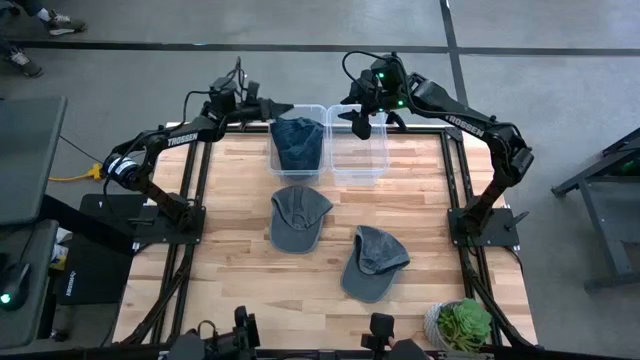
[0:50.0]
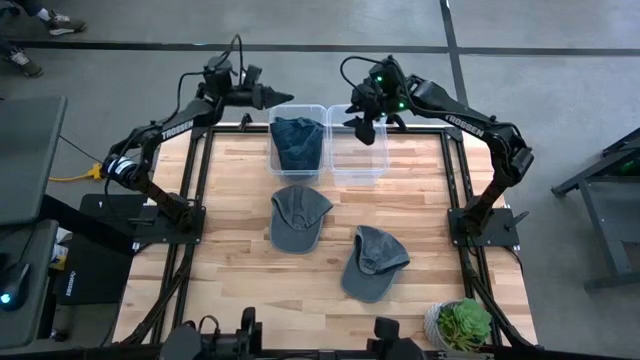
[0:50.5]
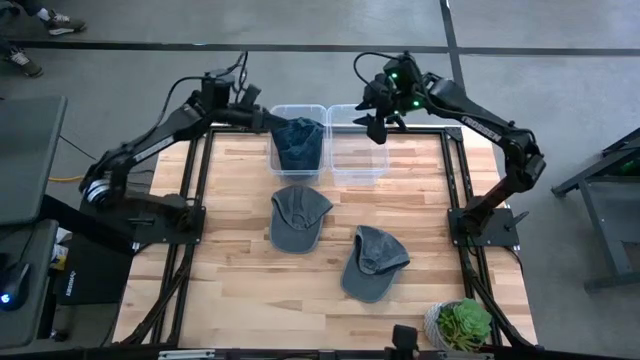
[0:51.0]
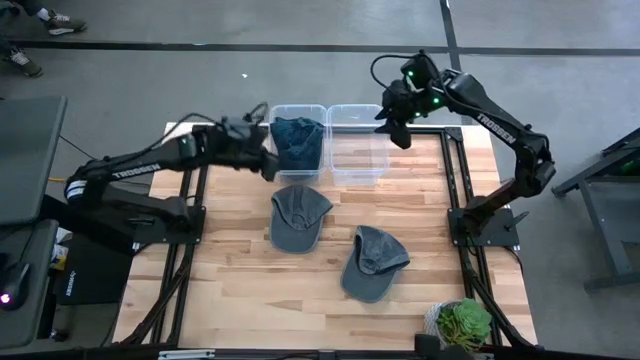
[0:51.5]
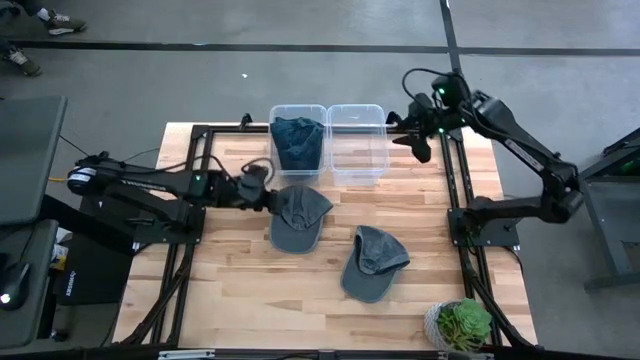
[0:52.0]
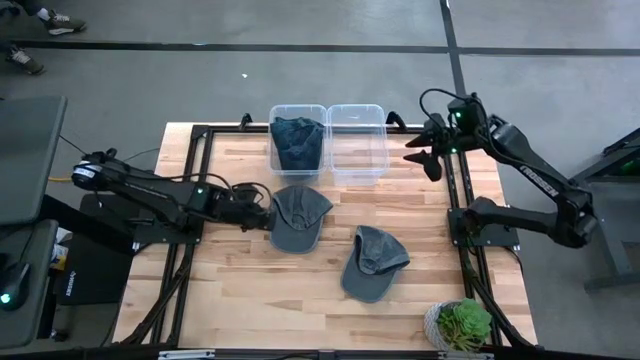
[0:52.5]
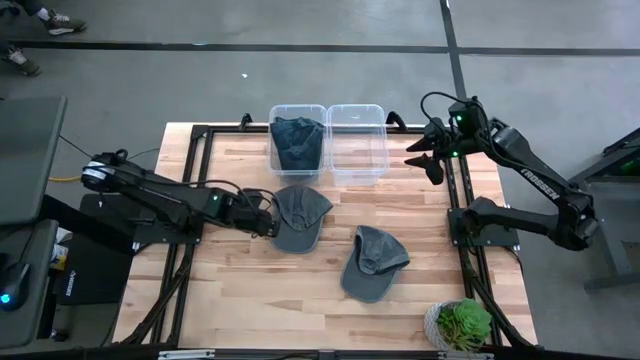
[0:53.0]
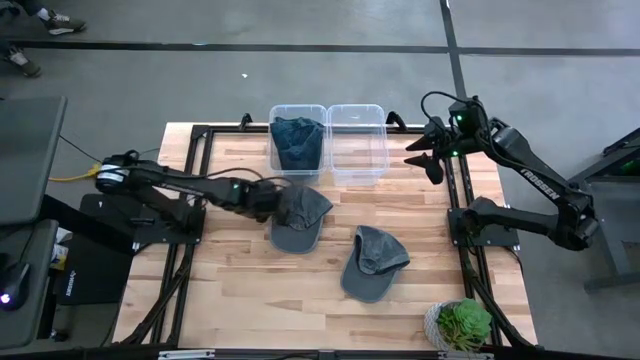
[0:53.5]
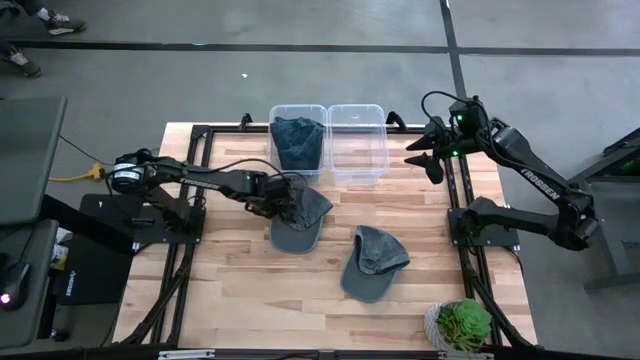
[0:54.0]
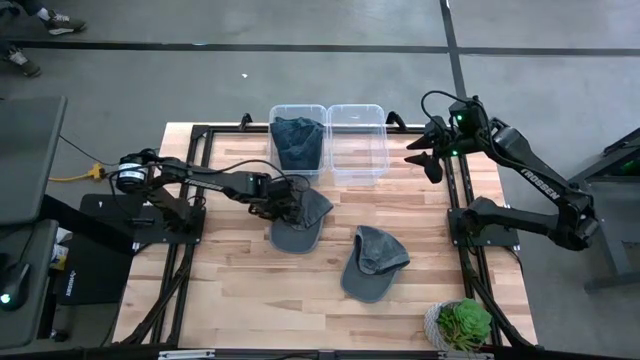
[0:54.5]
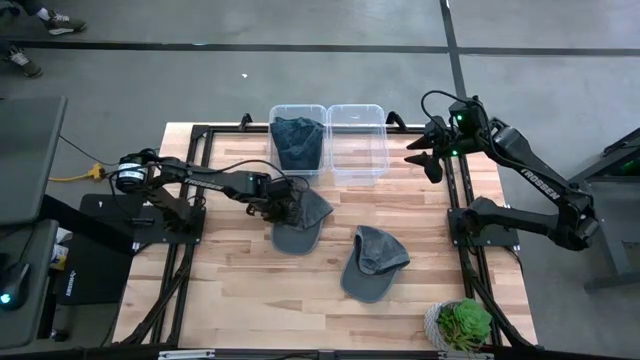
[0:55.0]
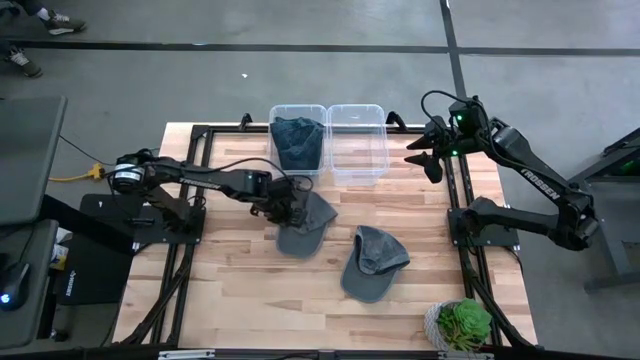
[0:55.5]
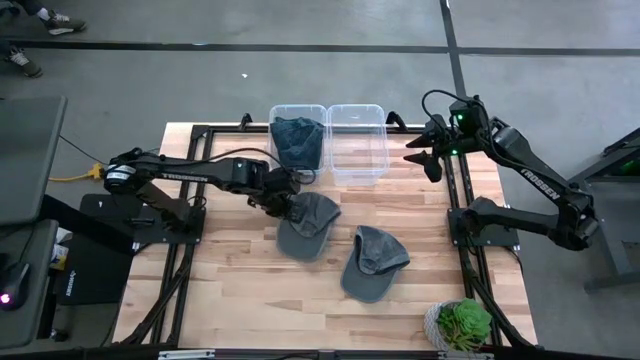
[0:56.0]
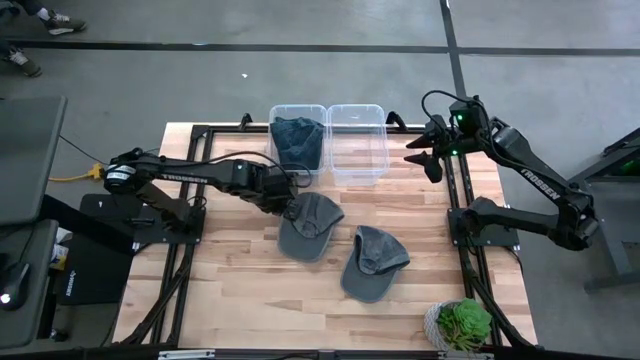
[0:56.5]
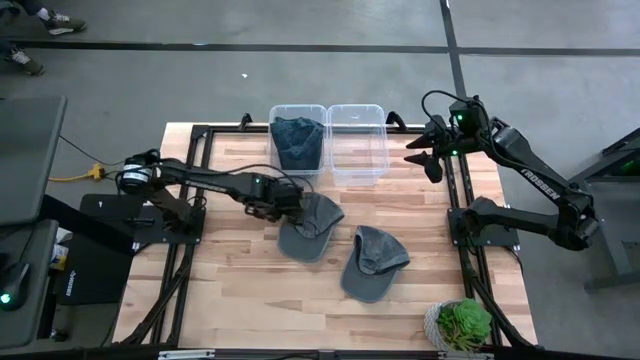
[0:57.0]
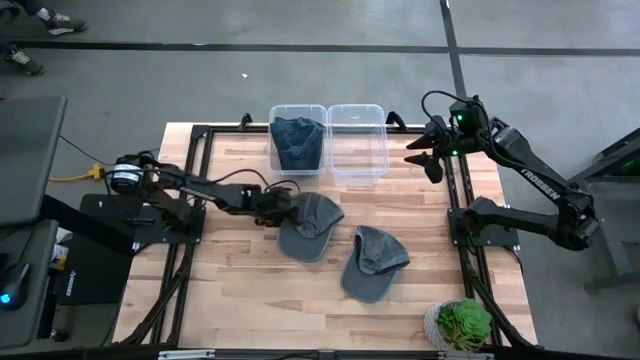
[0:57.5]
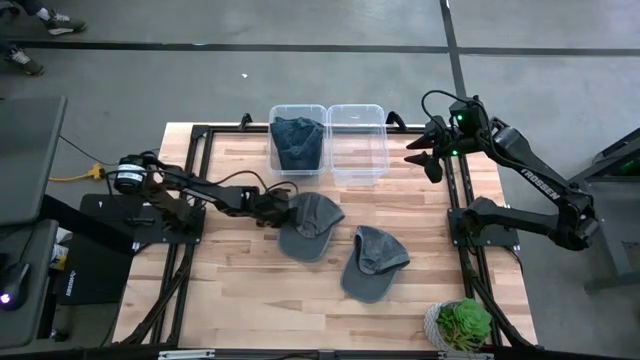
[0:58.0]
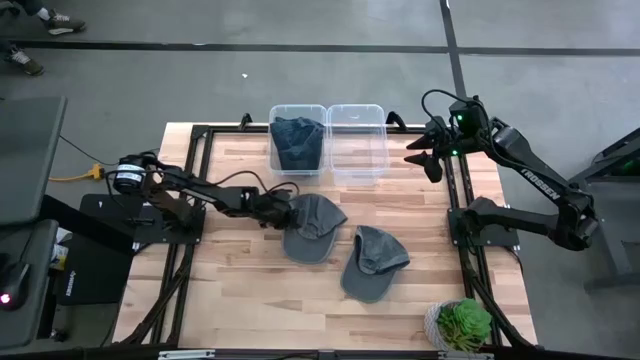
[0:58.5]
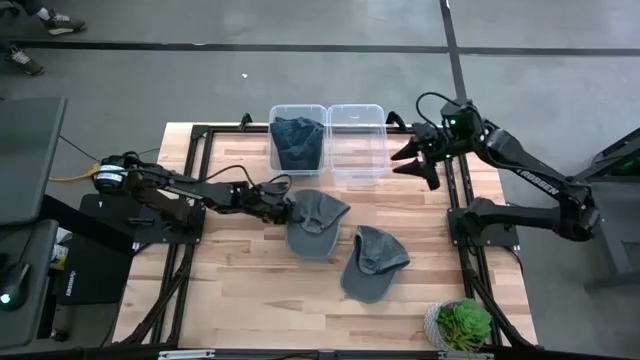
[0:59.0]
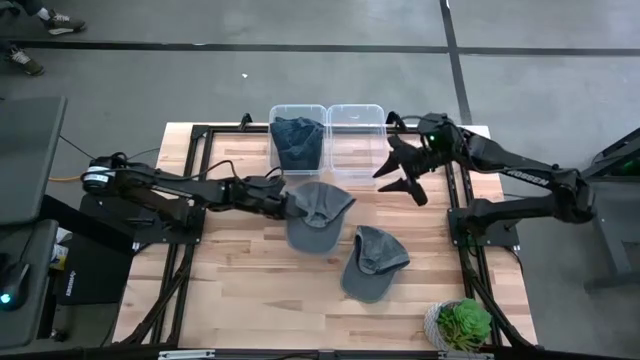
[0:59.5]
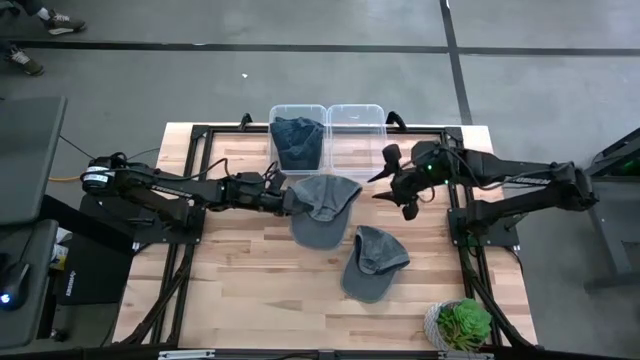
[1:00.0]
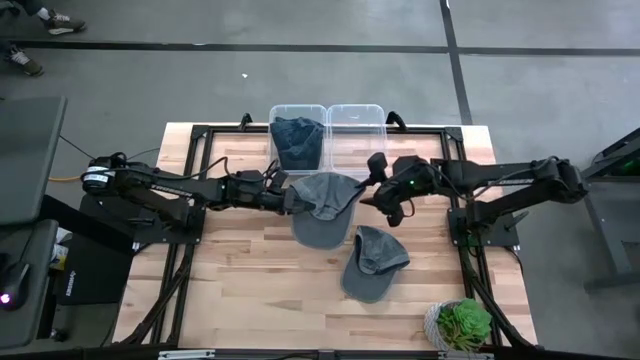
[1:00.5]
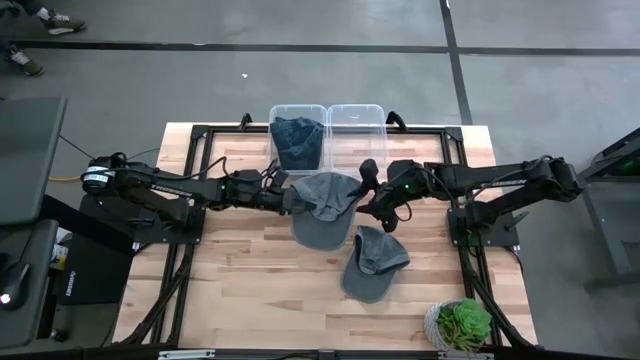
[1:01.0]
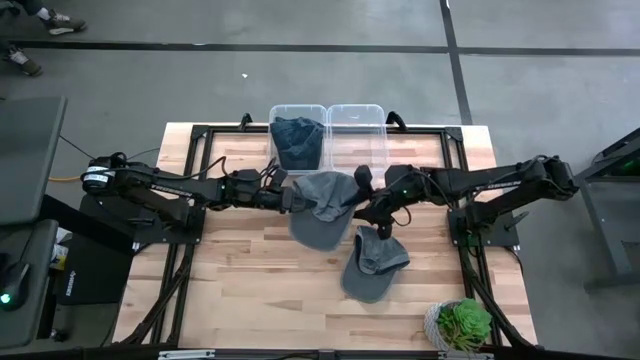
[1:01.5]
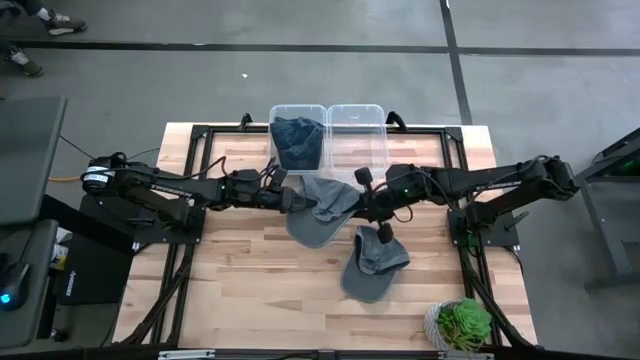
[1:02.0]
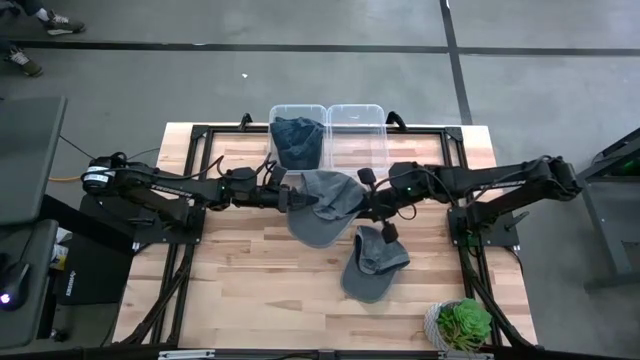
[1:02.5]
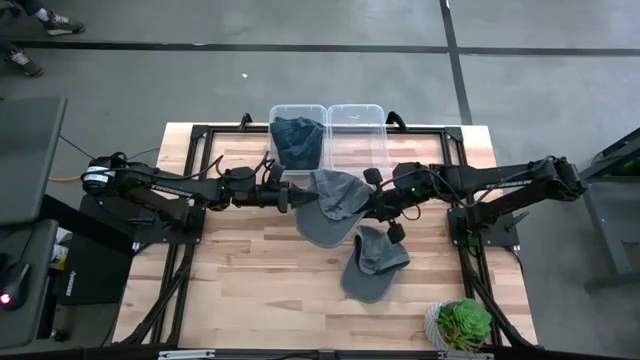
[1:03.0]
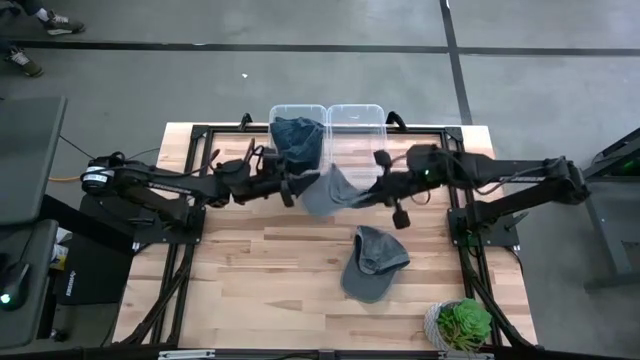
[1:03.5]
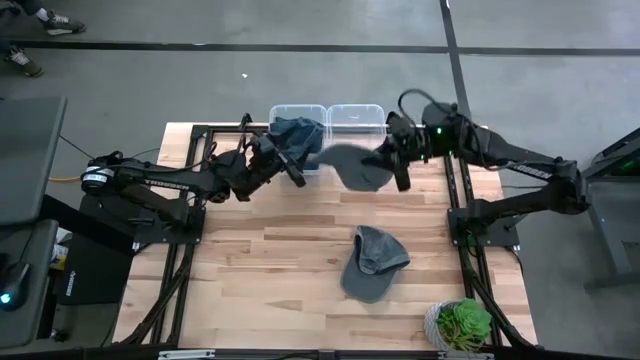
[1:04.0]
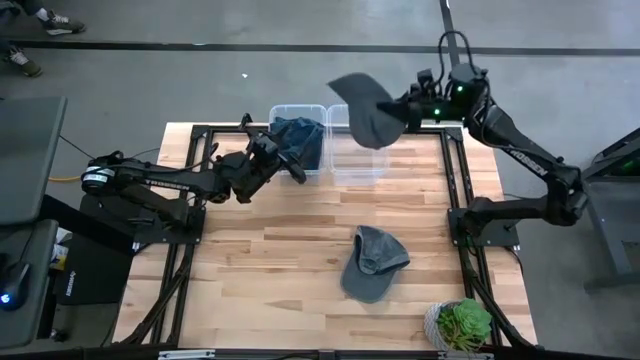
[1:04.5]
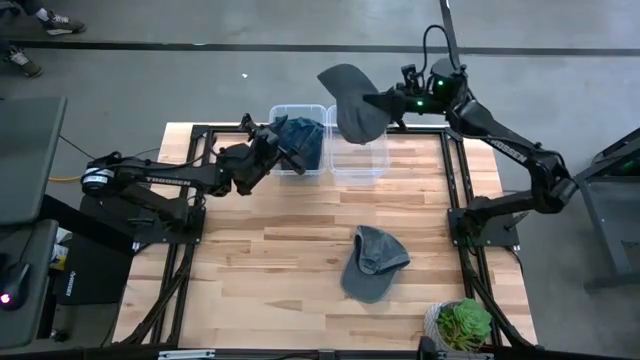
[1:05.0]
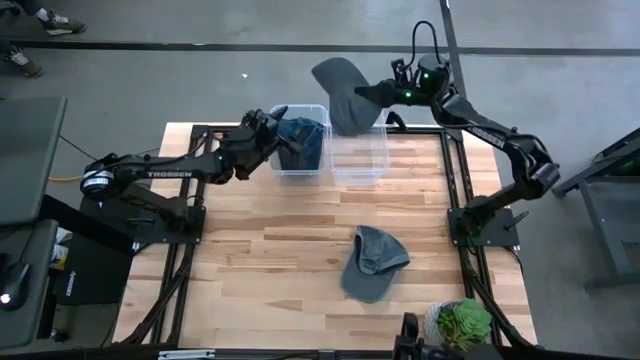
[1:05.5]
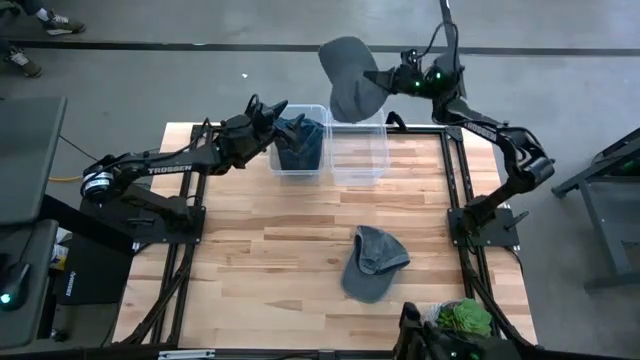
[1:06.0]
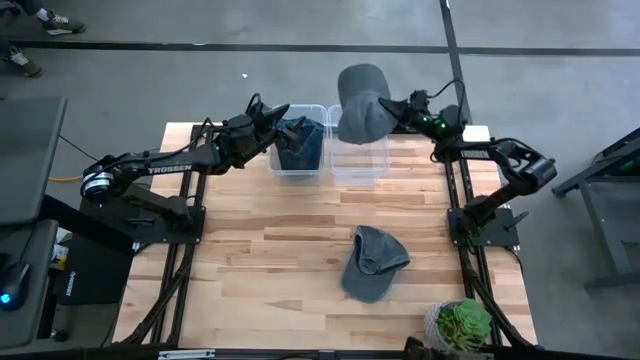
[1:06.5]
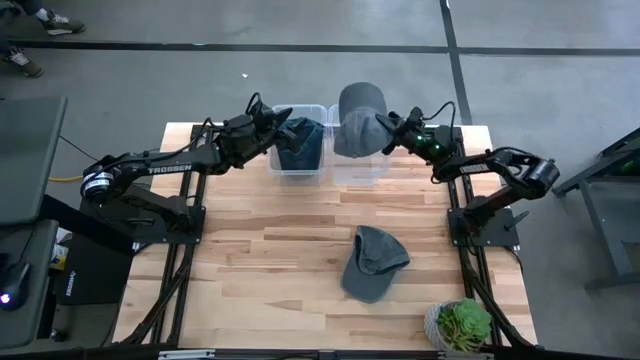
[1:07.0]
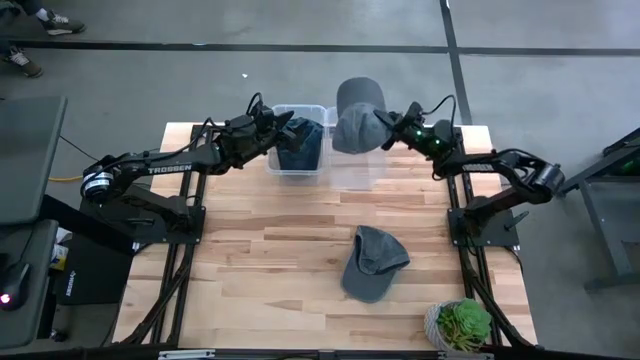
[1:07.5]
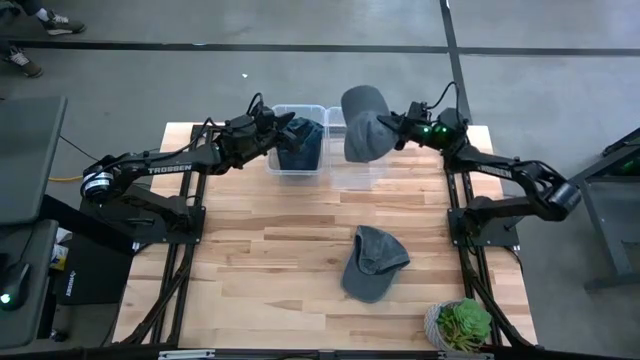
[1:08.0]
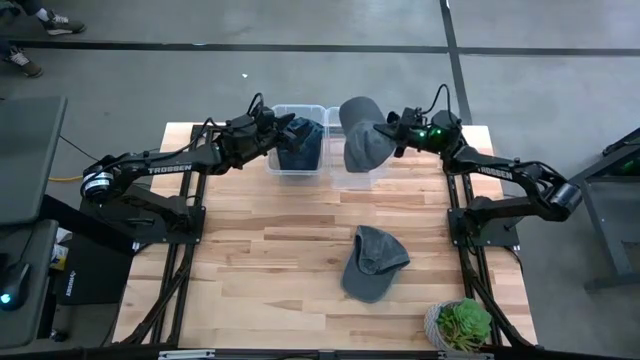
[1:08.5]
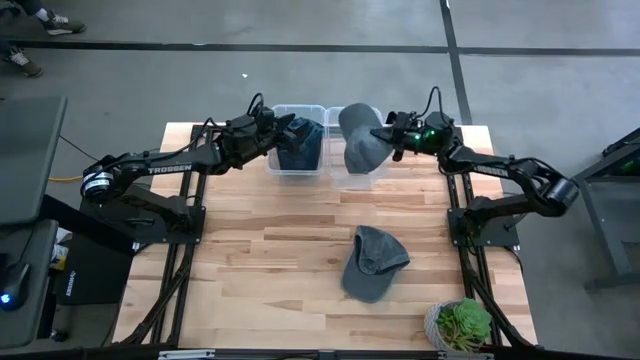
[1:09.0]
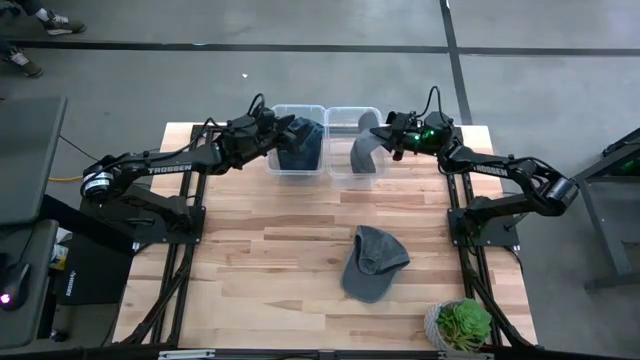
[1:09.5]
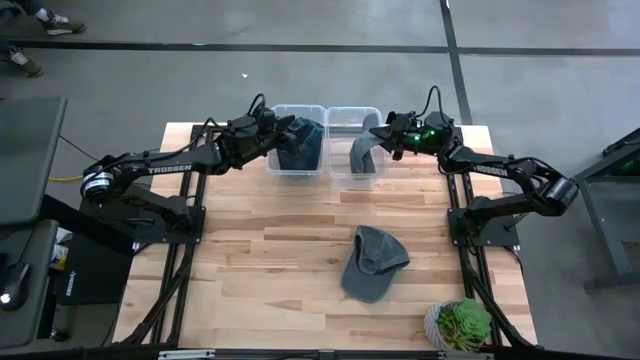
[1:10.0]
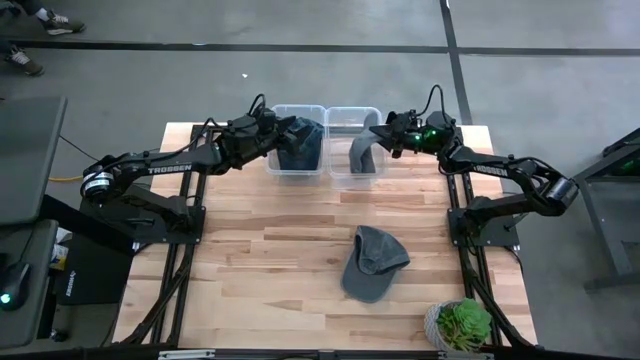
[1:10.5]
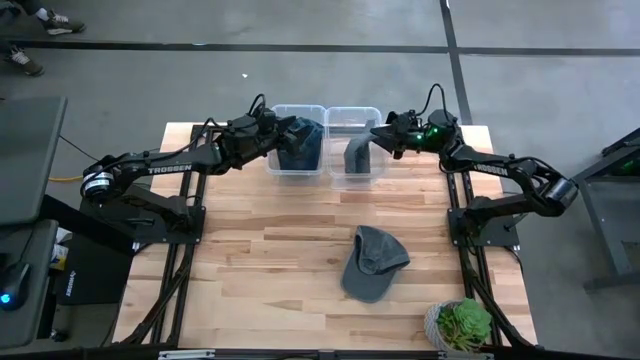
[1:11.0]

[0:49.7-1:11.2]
Task: Pick & Place hat
Put the left gray cap into the right transparent bin
